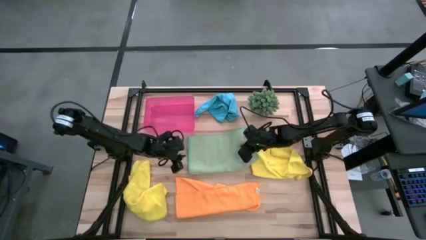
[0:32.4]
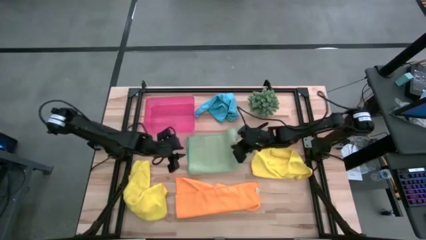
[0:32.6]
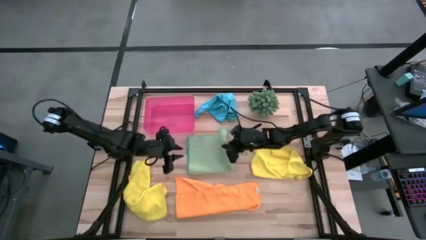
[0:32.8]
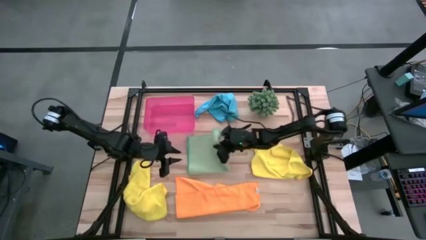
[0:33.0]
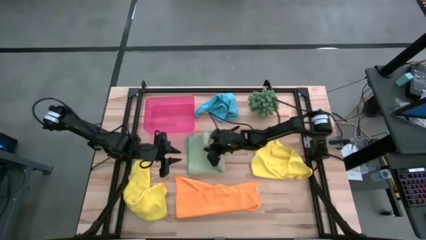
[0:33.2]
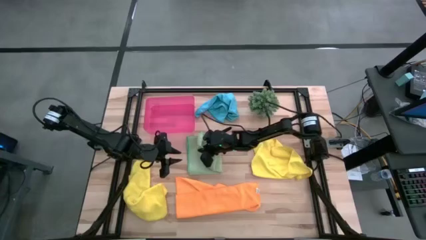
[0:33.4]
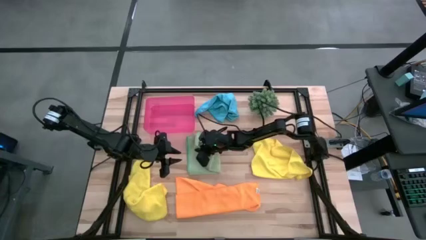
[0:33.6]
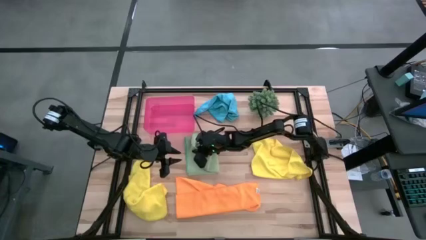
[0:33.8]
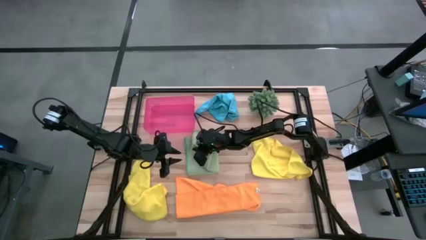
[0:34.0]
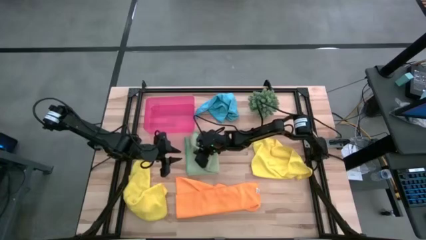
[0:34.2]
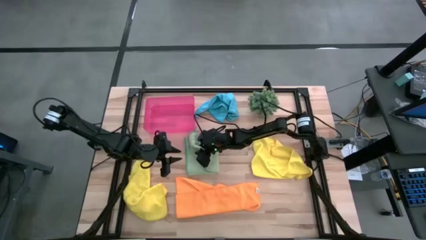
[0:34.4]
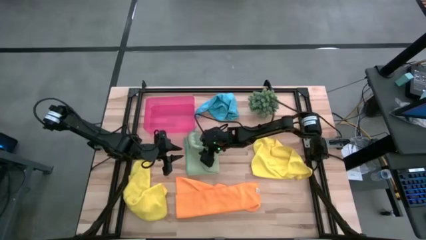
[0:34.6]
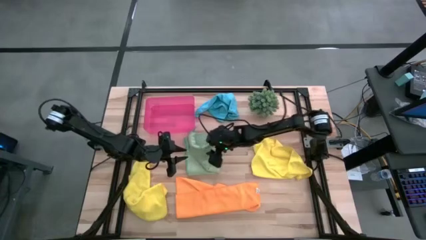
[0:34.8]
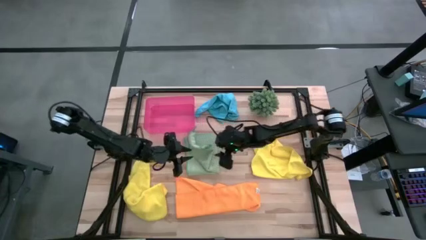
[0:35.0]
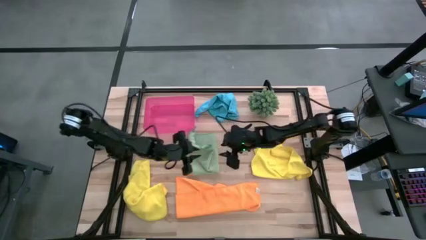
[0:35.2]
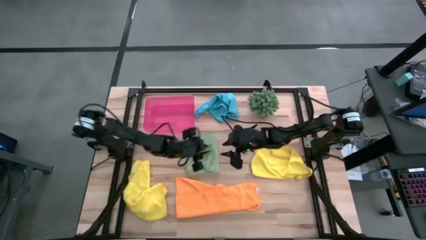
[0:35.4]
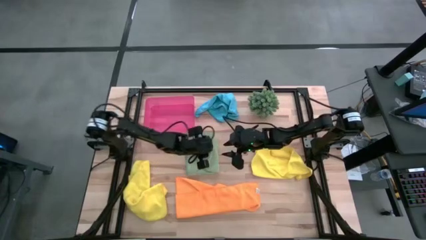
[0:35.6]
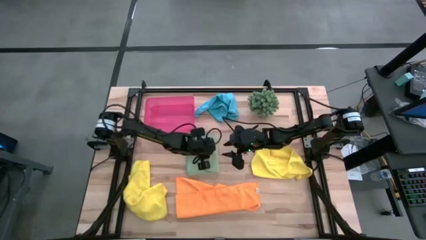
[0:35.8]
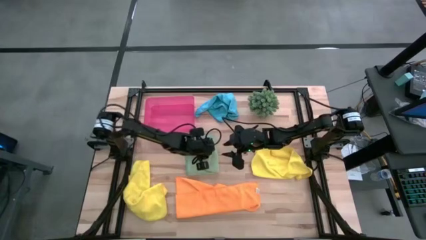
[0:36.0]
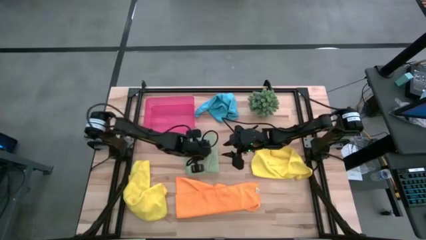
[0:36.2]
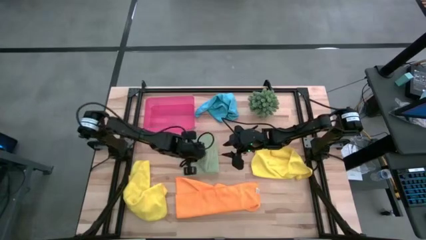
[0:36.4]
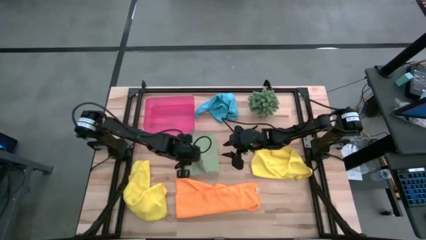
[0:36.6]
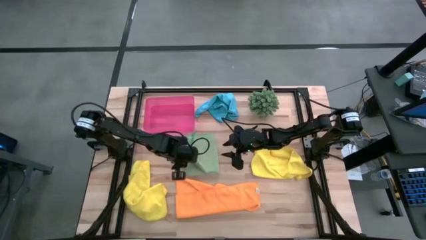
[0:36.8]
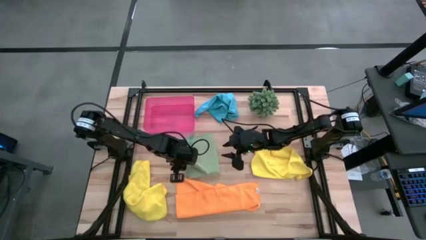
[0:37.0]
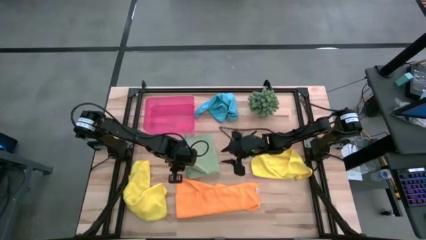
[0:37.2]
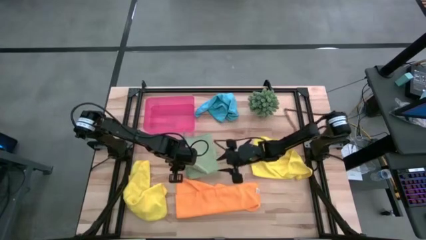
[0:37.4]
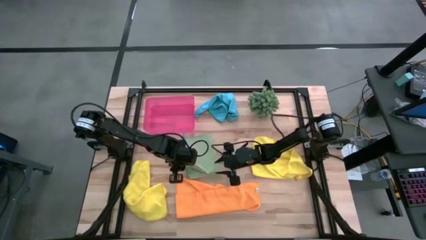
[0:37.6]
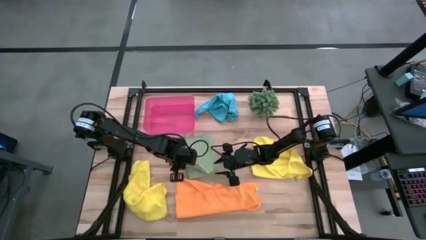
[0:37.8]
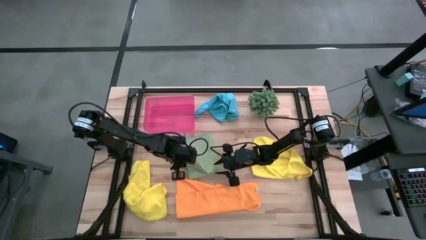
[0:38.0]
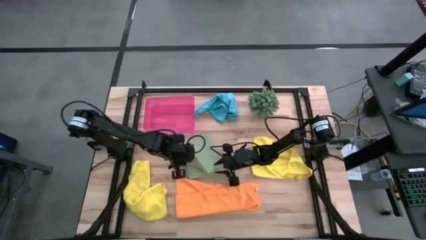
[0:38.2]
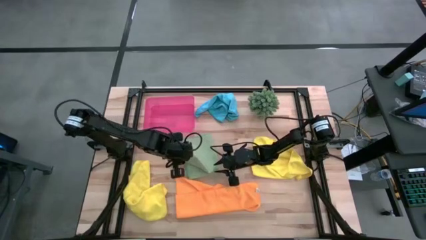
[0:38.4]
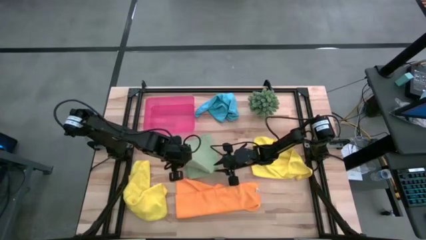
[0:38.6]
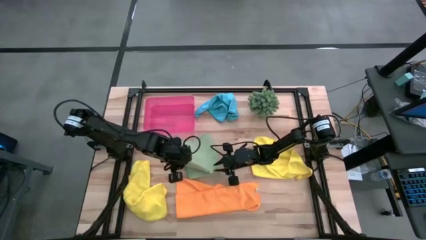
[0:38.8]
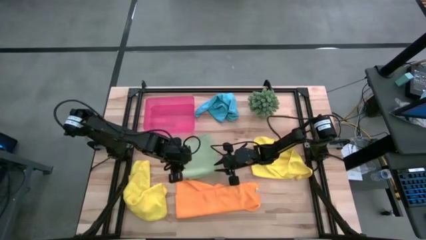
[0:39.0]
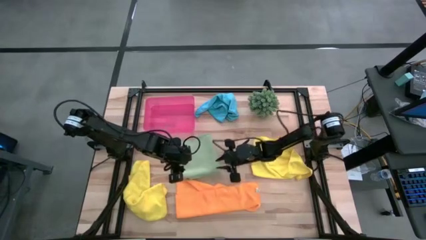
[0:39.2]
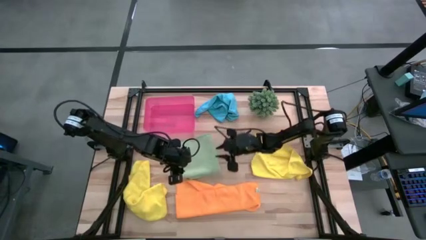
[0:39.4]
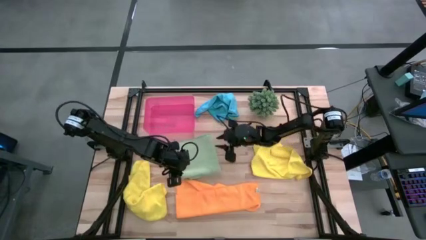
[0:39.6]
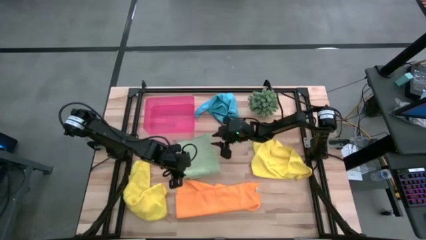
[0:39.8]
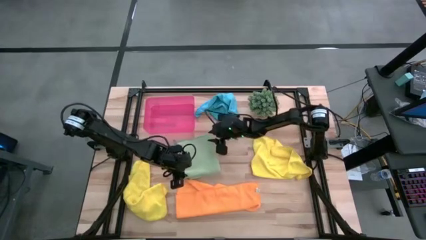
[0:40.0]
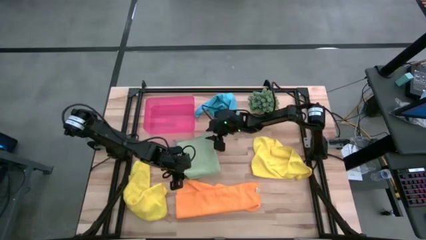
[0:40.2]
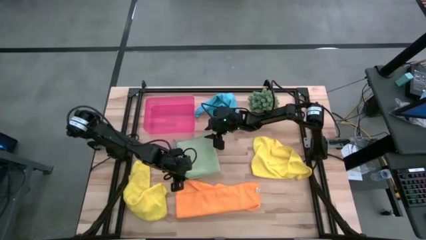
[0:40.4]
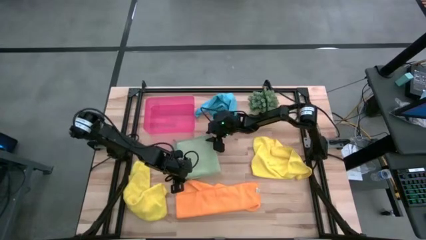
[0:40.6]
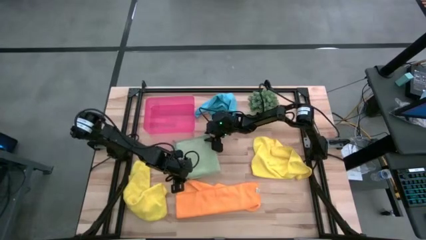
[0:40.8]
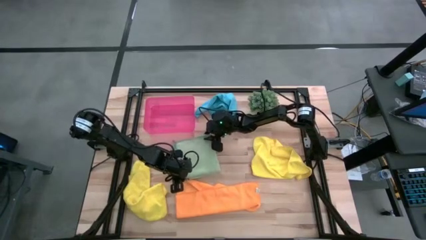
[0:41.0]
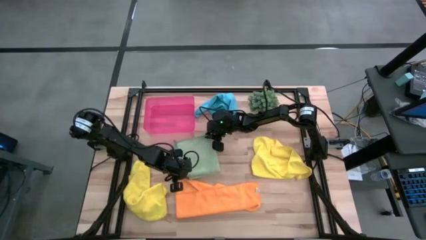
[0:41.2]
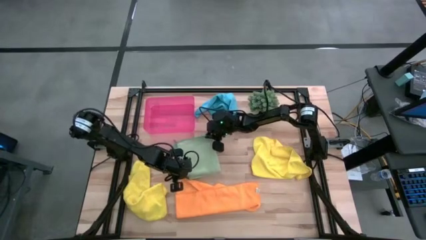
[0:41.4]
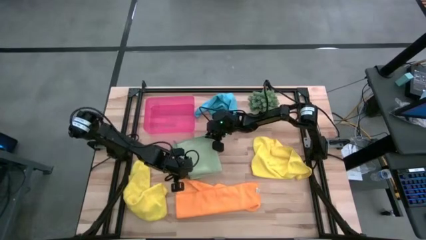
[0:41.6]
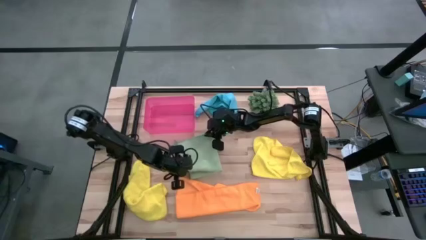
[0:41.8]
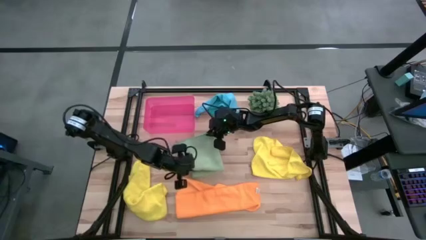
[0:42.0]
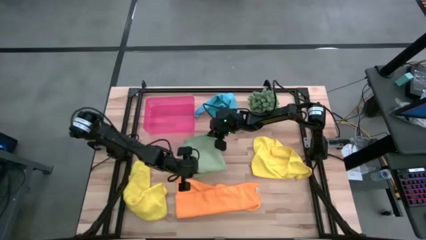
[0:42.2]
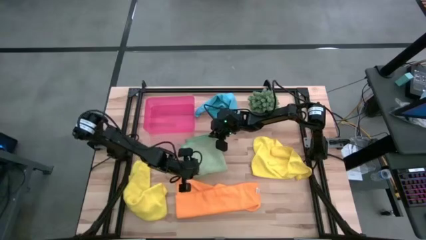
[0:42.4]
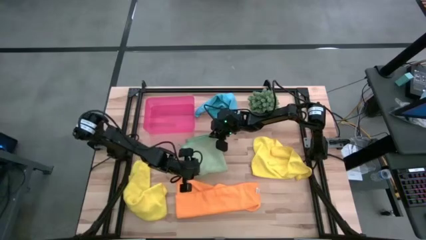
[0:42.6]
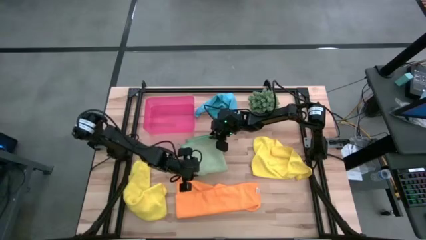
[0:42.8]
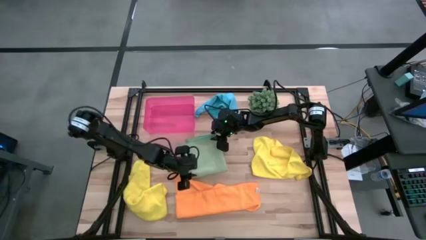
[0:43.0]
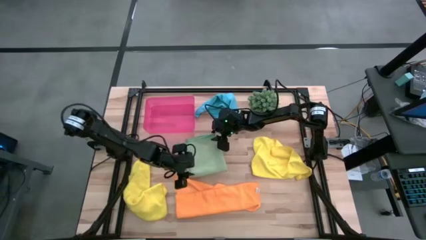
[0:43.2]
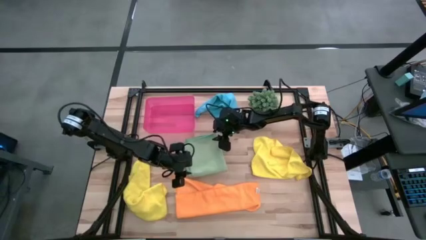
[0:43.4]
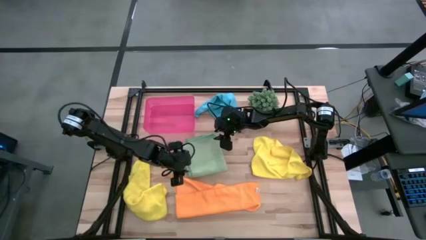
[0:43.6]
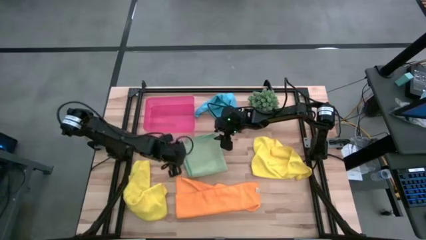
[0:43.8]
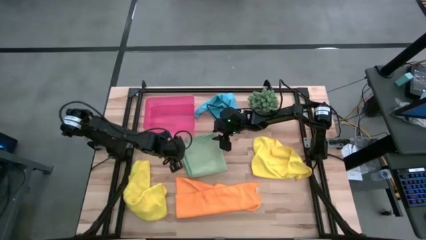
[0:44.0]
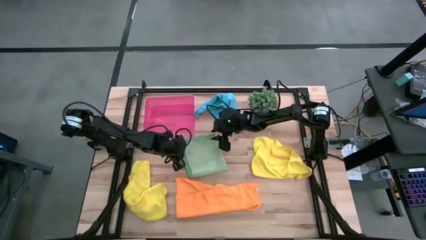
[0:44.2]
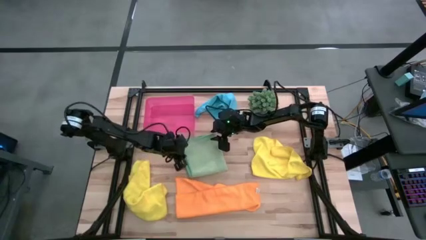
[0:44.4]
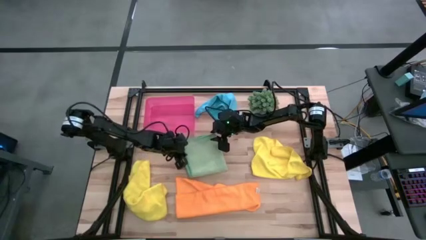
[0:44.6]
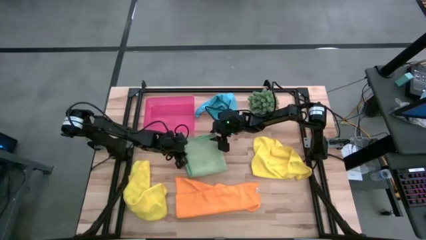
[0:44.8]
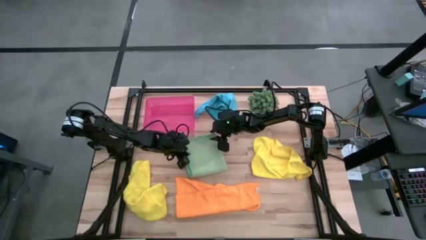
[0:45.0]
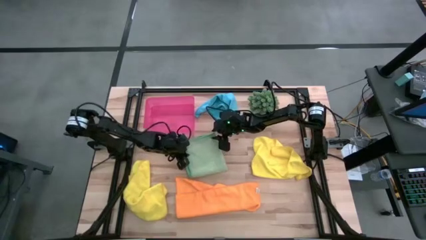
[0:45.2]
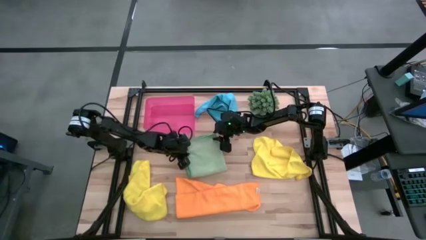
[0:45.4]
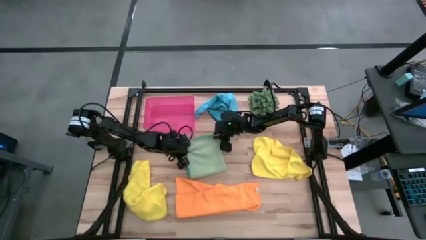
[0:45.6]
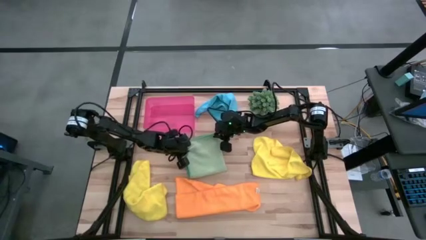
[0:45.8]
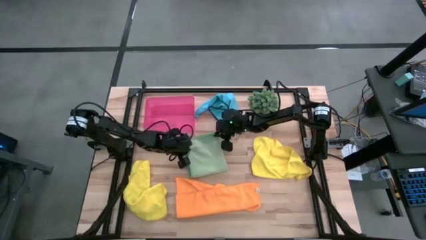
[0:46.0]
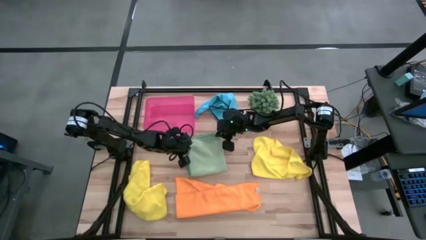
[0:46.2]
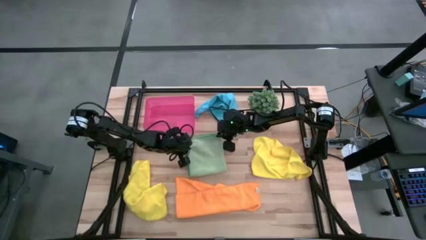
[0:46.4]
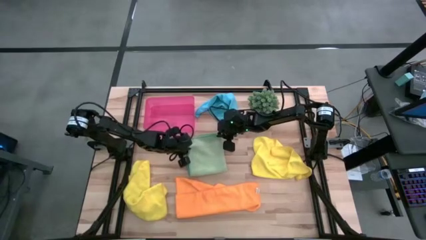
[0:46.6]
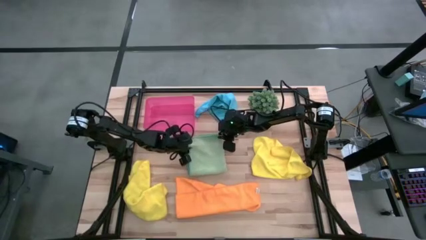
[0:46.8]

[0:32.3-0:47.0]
Task: Fold microfiber towels
Fold the green towel
